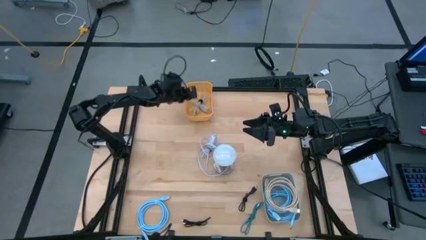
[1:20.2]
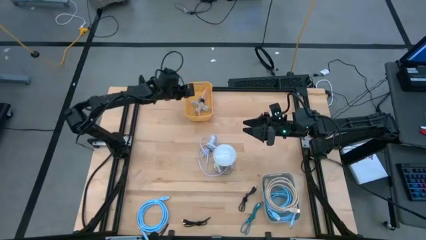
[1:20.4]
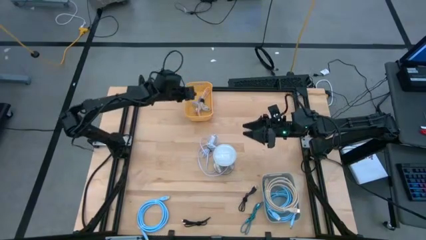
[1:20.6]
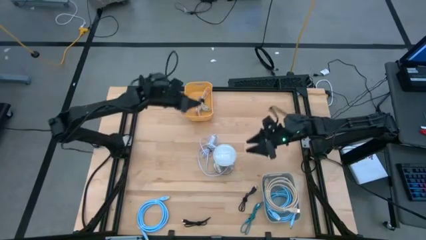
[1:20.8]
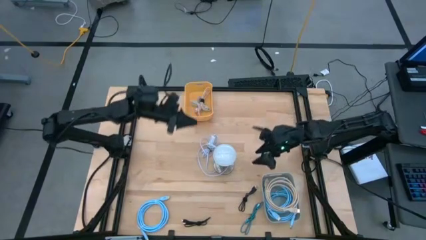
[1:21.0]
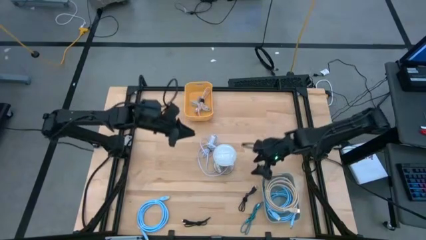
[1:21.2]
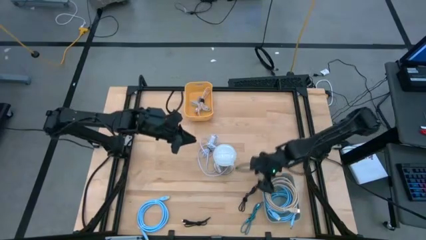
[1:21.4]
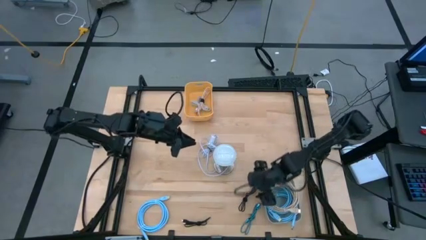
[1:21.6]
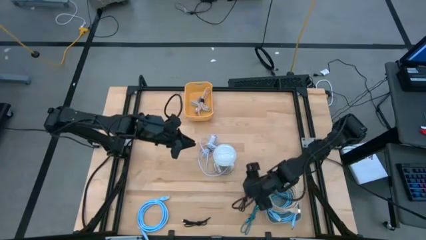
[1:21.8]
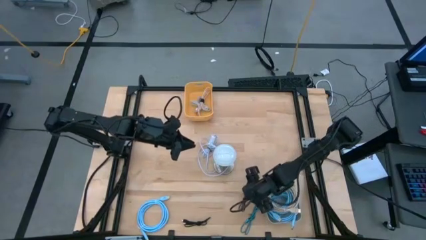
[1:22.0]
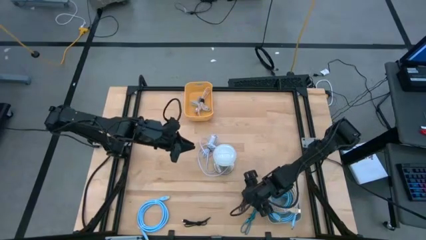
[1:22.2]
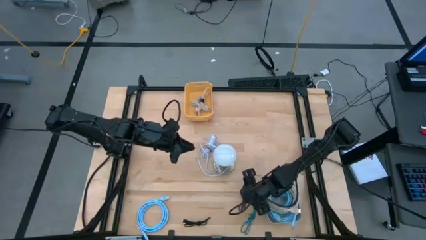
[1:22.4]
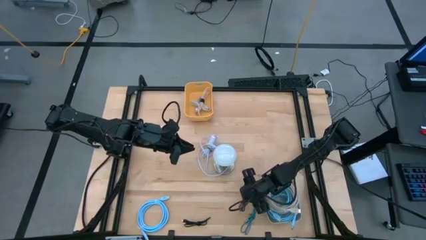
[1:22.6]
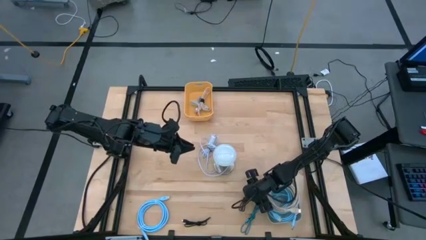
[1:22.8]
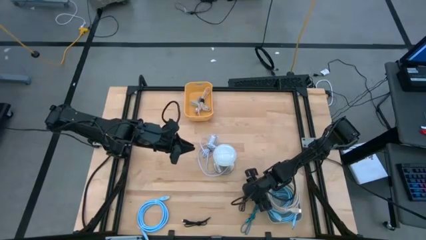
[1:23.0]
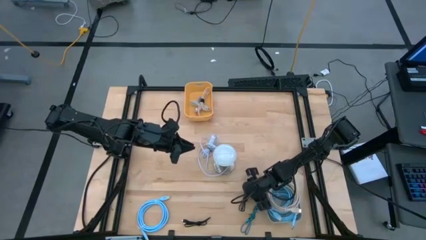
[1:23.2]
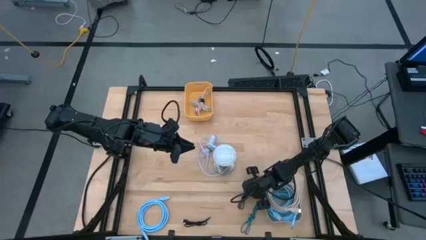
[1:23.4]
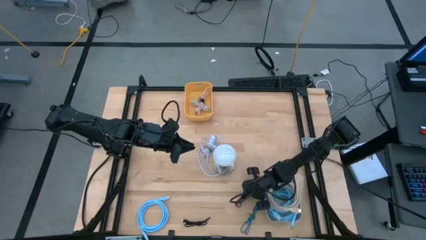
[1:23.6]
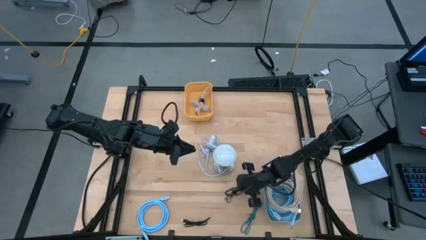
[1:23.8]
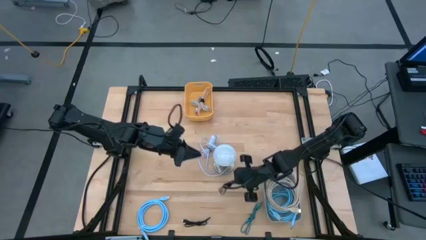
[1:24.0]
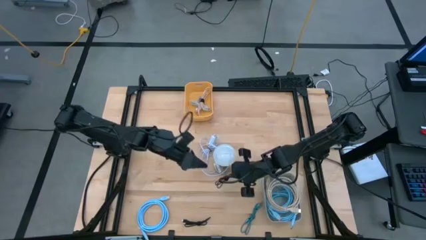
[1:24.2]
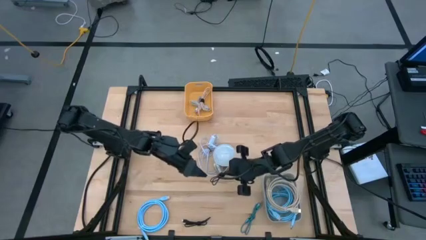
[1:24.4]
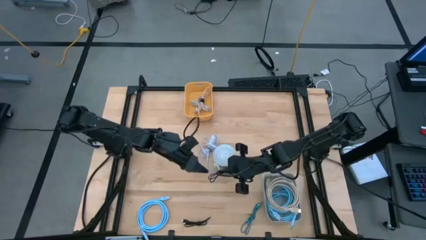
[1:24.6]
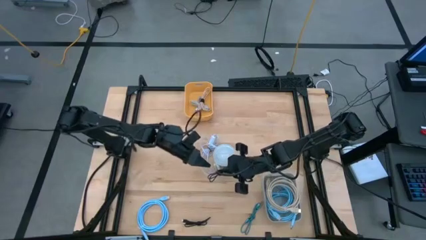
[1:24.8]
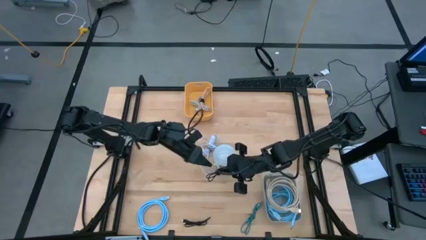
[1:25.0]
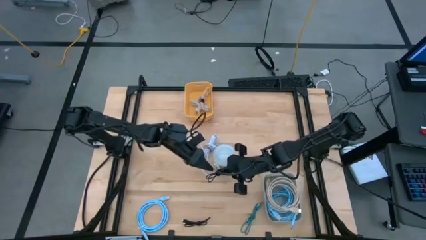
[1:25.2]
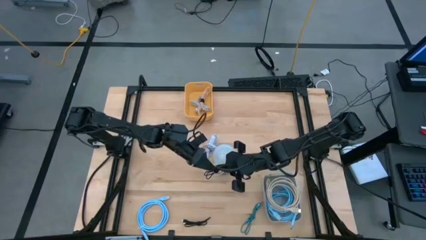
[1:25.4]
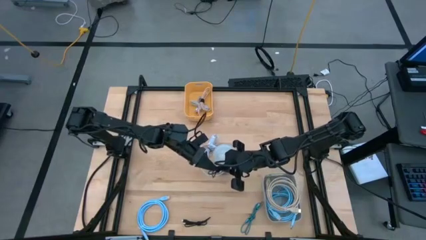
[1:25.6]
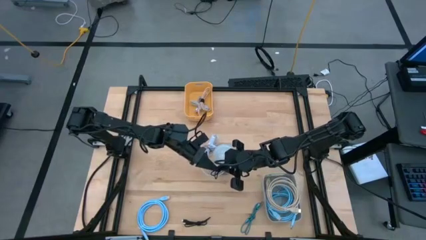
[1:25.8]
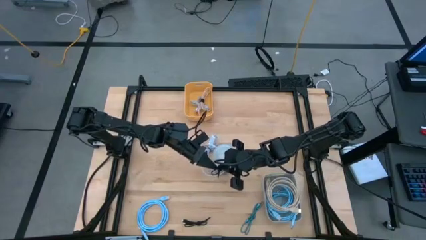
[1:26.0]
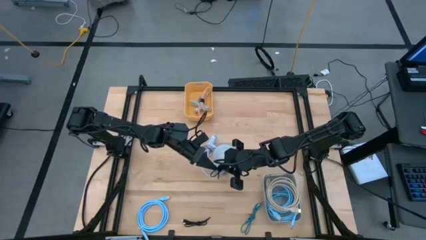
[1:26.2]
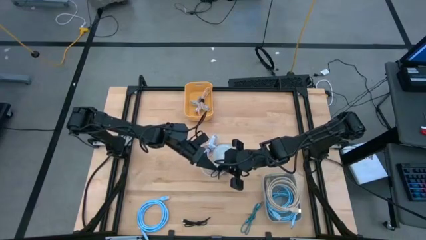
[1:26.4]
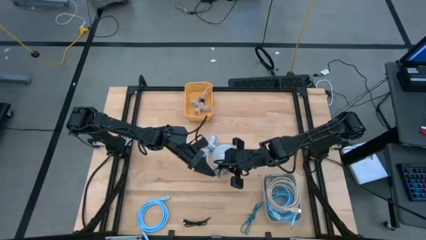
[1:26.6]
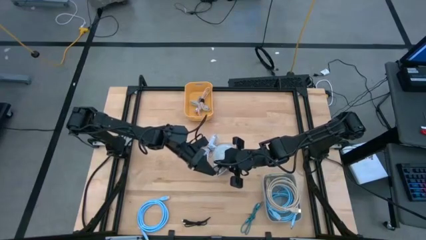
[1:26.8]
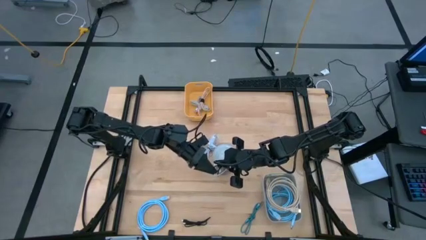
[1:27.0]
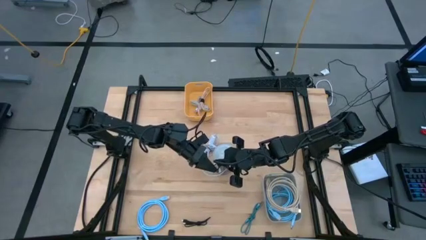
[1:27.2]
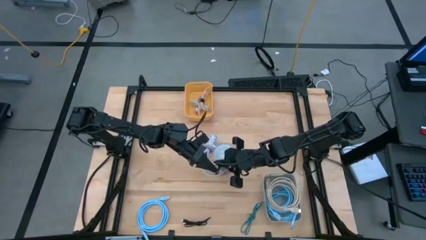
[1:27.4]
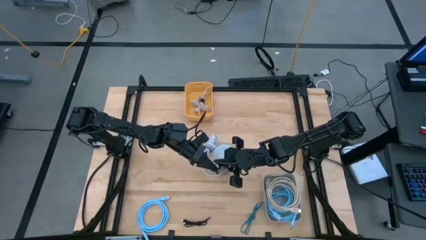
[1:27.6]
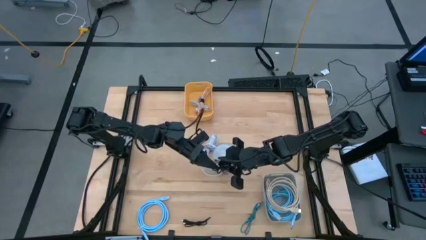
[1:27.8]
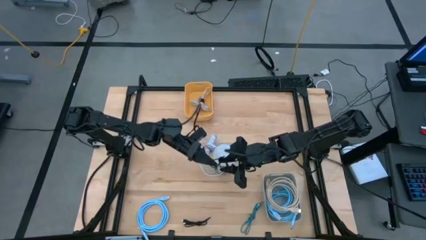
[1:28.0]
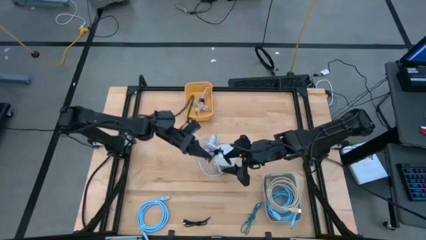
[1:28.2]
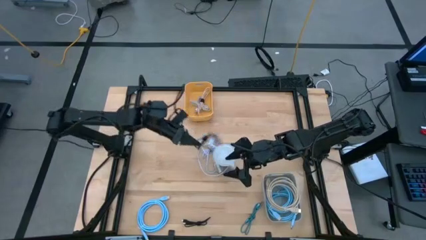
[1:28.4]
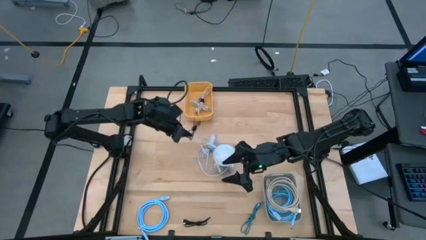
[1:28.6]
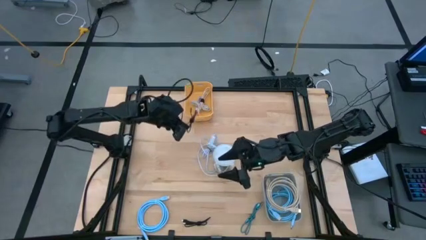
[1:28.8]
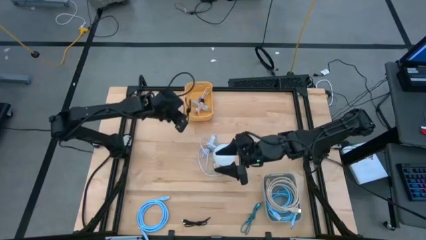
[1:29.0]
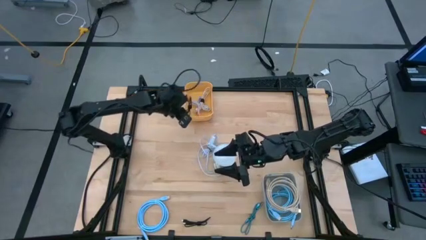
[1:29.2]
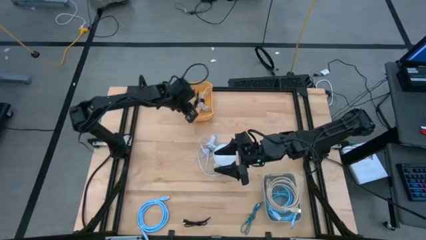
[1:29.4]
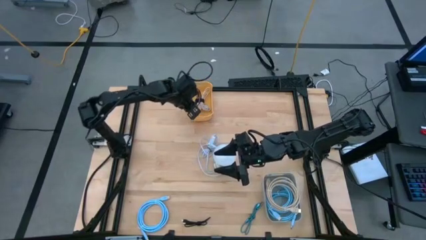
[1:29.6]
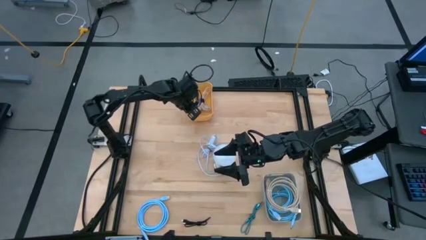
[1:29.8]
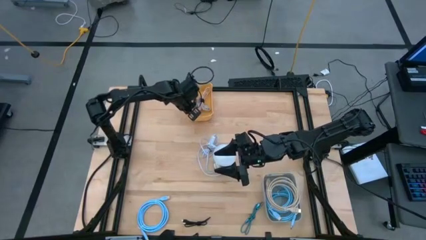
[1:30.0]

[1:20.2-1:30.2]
Task: Pick & Place USB Port
Put the right black charger cable into the yellow bin

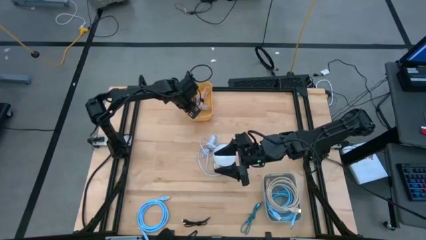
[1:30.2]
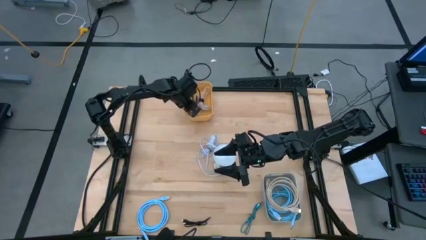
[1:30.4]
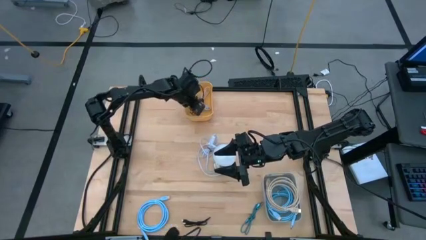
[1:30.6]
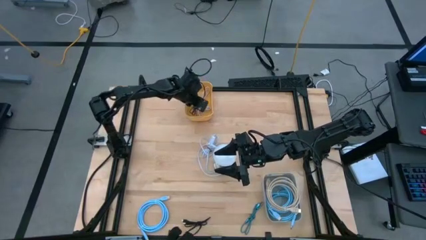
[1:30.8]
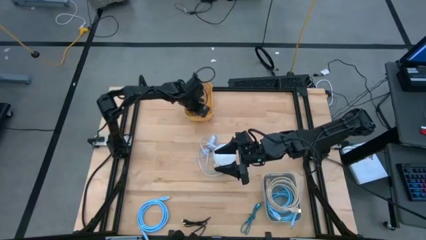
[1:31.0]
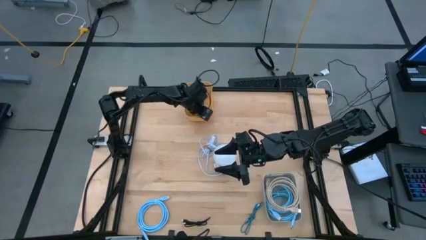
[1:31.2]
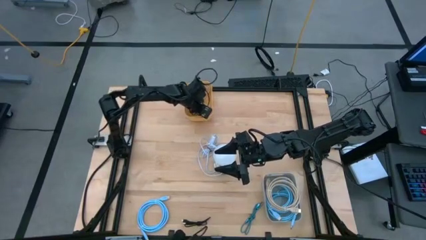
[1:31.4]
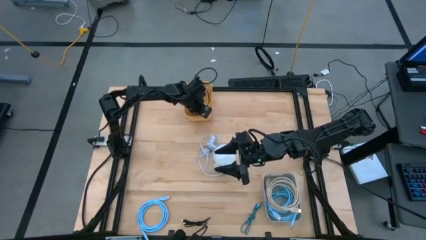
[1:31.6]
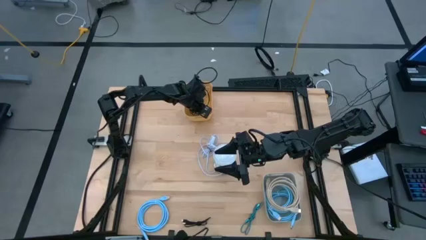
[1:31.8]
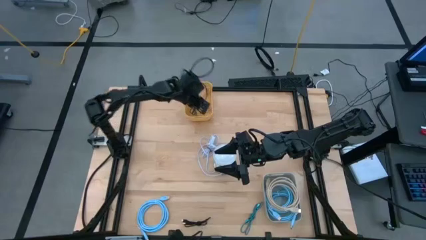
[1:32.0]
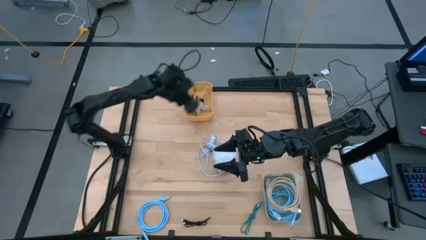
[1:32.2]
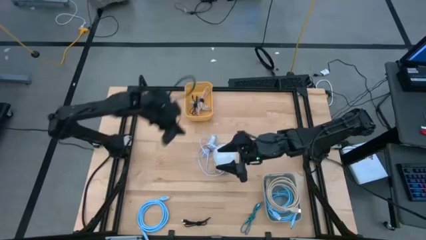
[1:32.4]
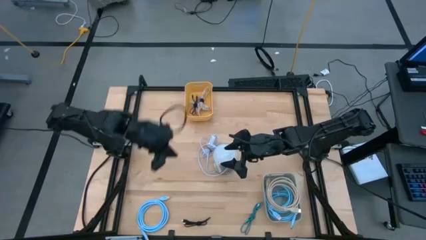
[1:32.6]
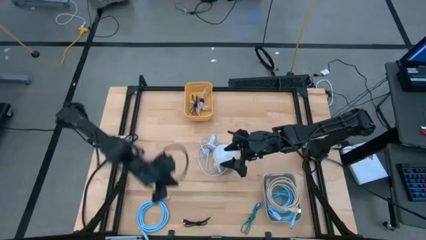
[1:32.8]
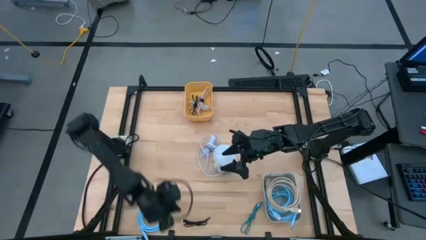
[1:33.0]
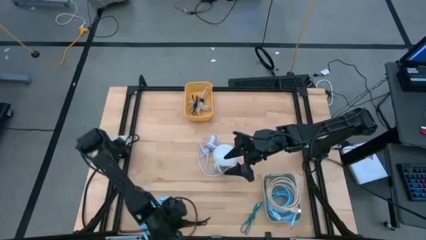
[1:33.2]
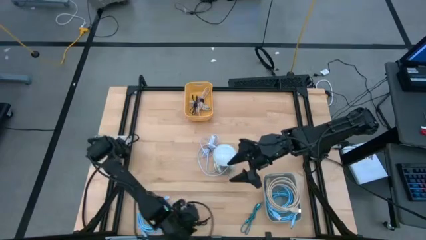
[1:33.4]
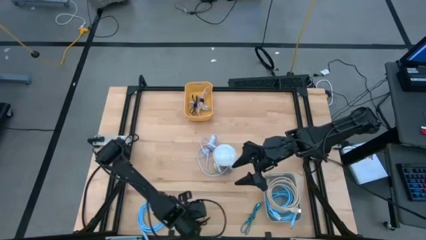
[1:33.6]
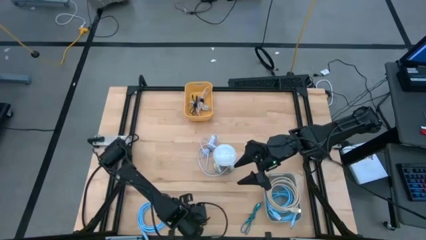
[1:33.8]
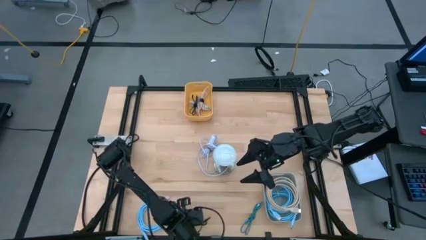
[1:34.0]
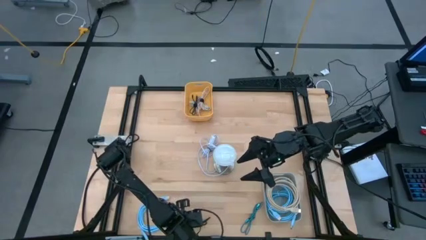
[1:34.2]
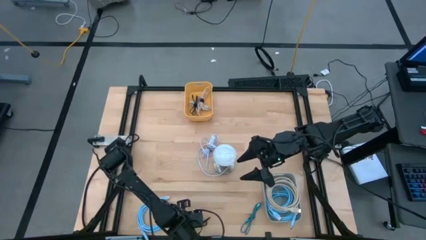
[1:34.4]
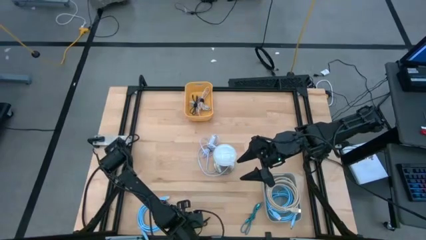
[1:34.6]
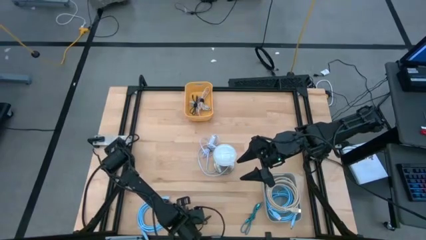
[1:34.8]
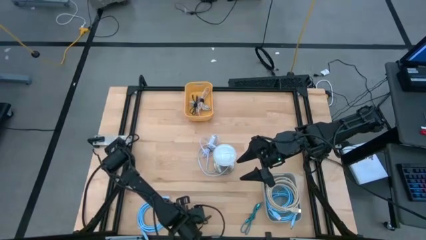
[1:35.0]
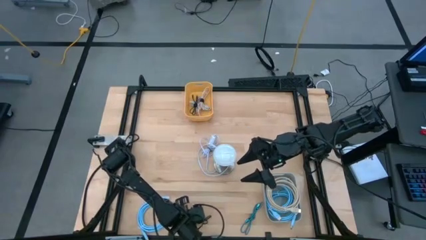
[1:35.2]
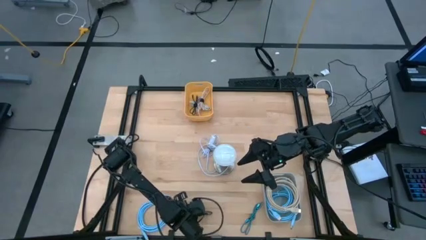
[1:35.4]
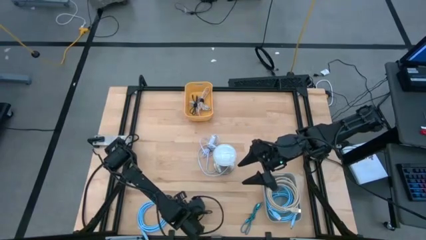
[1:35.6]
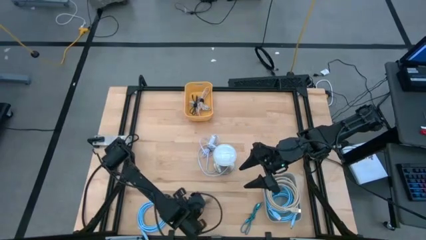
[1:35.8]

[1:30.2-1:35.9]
Put the black charger cable into the yellow bin

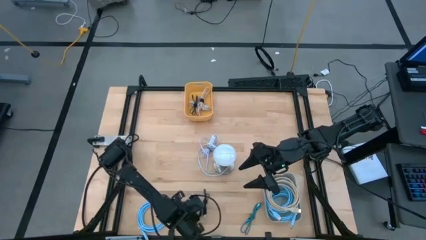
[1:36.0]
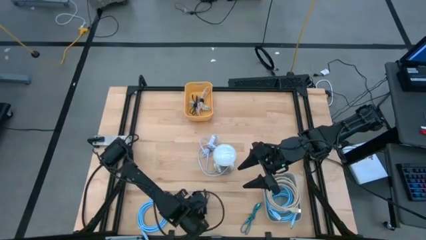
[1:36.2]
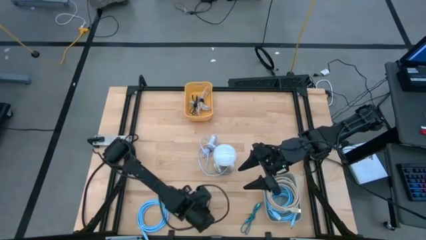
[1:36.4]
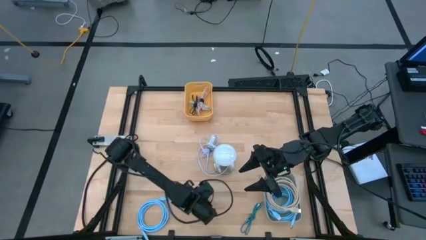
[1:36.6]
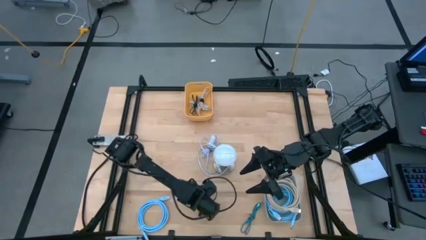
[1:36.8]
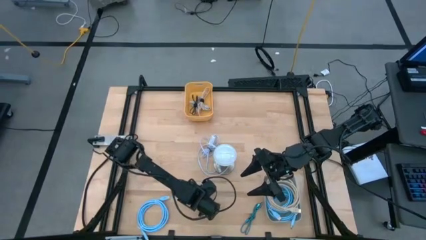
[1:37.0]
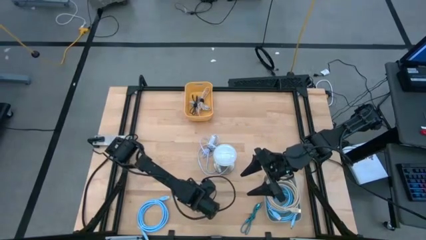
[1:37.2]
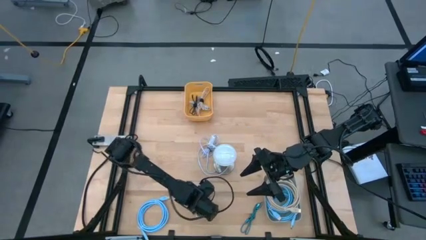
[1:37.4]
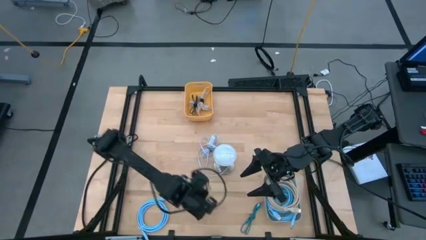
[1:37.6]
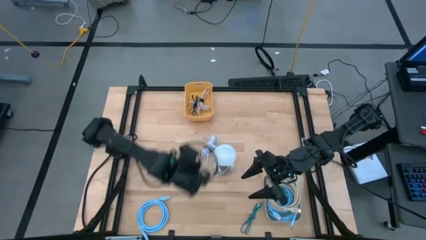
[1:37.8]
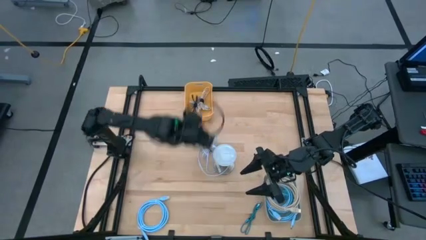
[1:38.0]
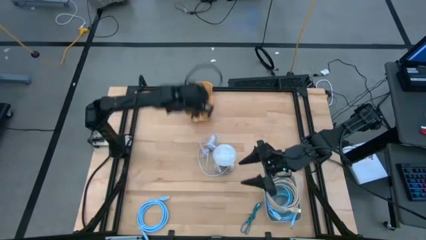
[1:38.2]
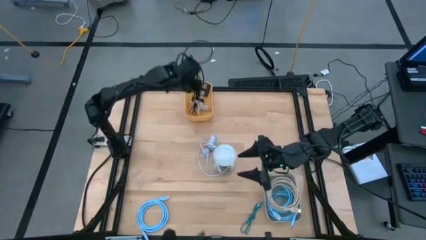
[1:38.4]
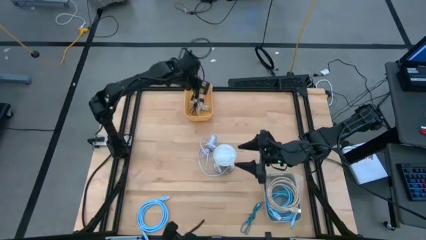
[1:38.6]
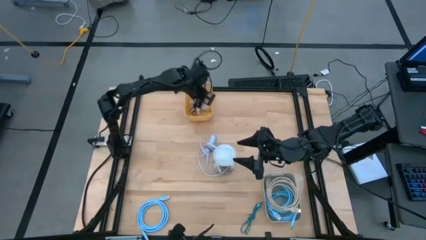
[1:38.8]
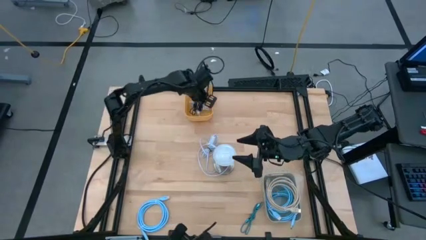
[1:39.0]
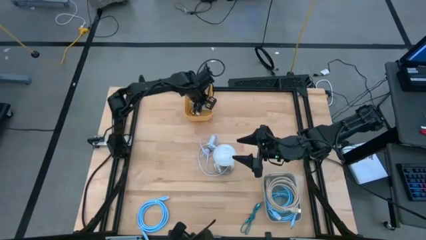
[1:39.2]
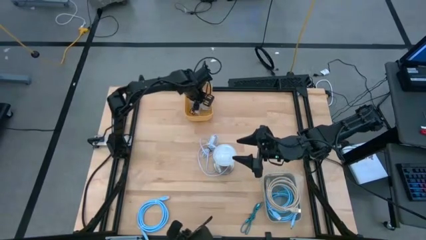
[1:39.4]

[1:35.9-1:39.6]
Put the black charger cable into the yellow bin
